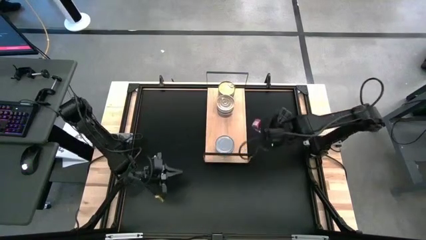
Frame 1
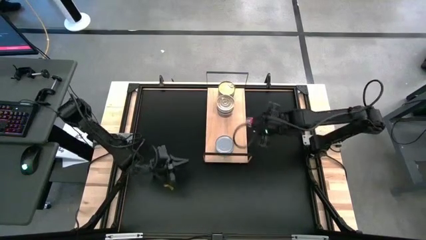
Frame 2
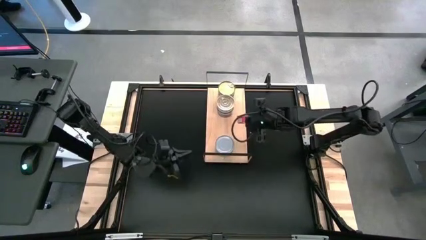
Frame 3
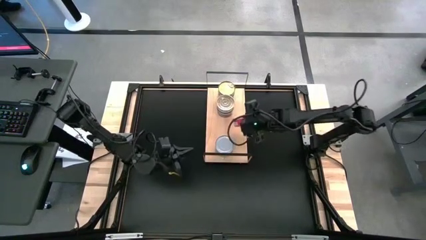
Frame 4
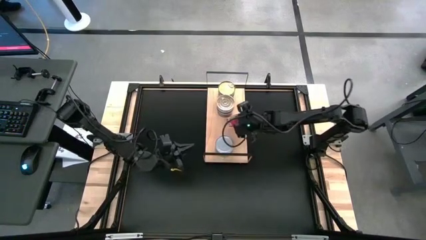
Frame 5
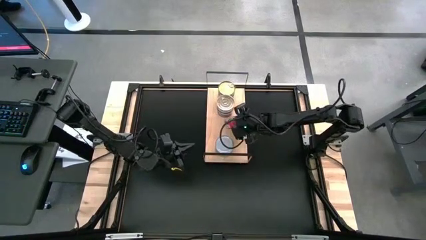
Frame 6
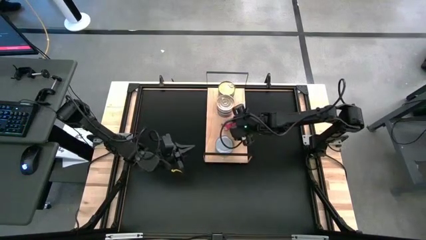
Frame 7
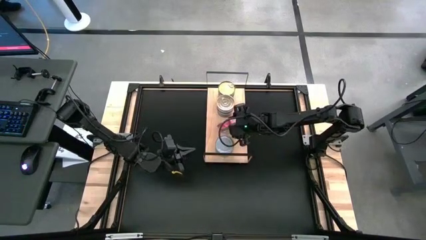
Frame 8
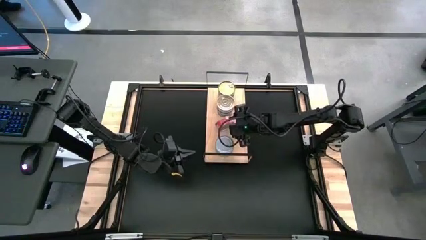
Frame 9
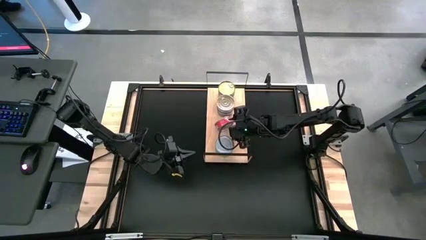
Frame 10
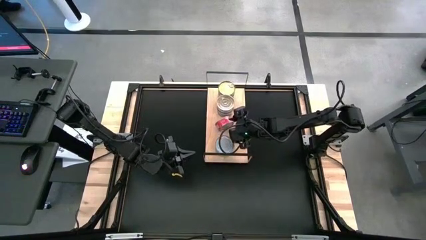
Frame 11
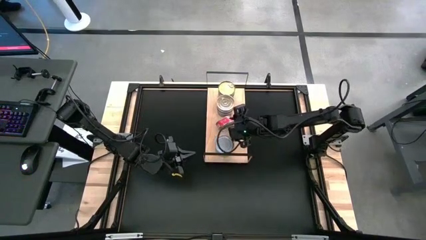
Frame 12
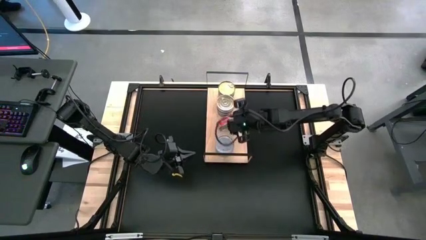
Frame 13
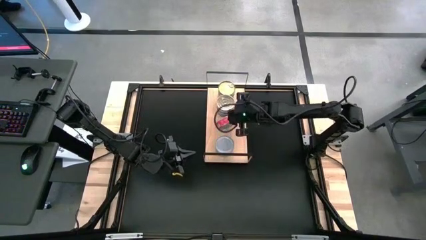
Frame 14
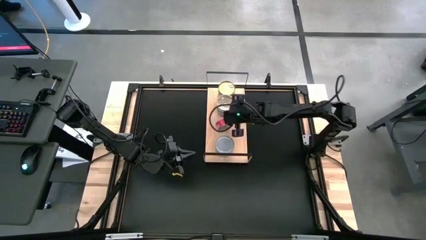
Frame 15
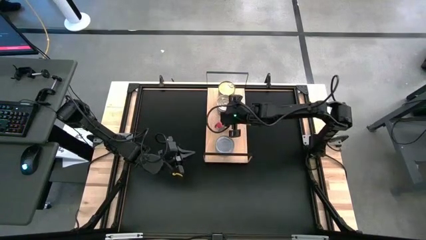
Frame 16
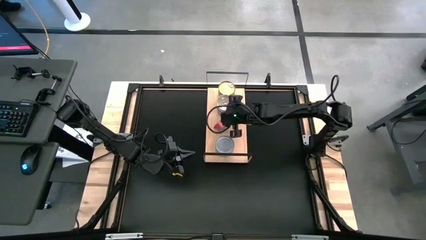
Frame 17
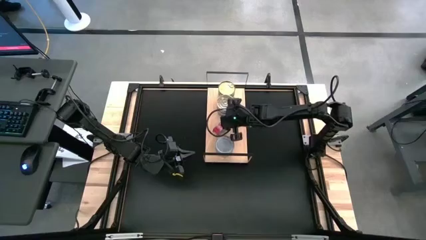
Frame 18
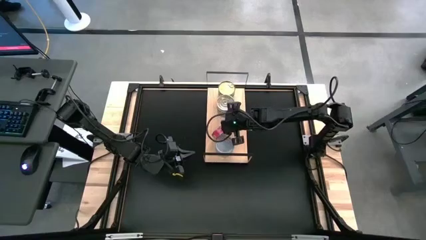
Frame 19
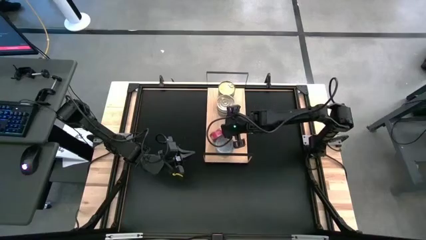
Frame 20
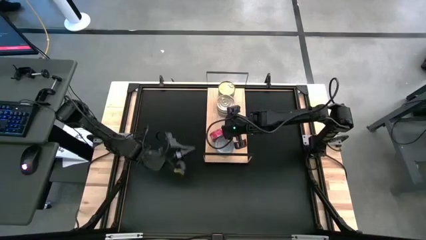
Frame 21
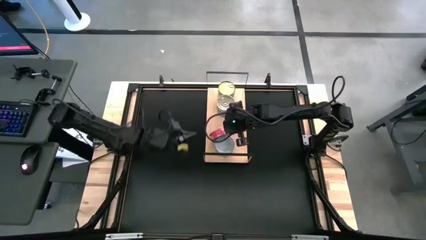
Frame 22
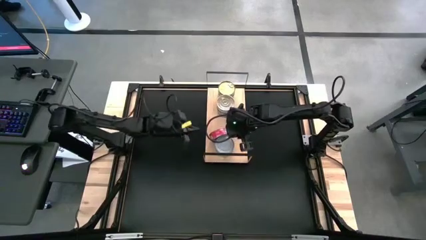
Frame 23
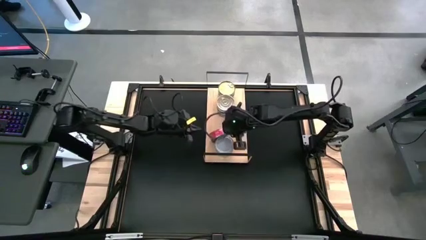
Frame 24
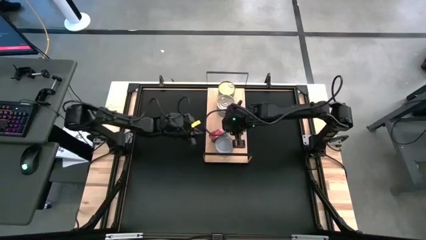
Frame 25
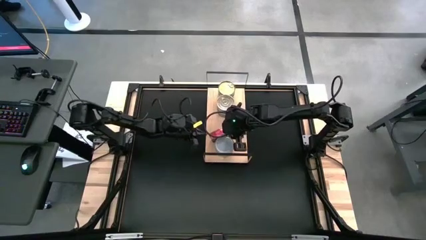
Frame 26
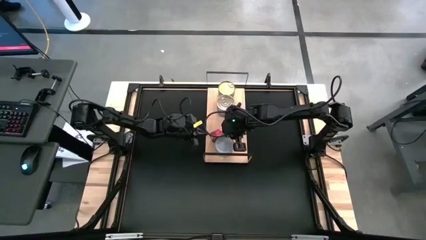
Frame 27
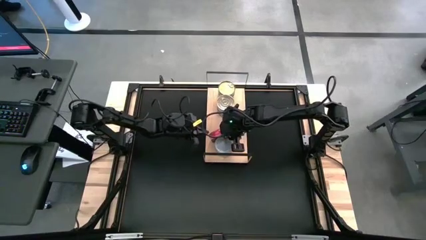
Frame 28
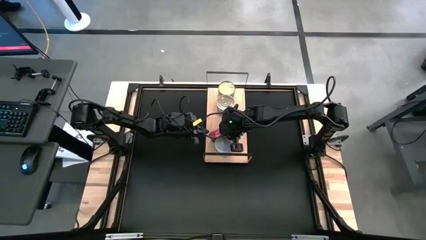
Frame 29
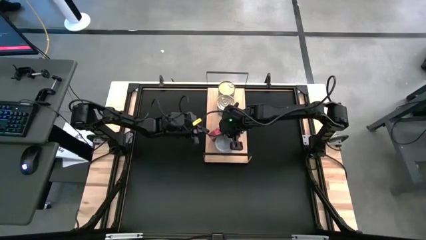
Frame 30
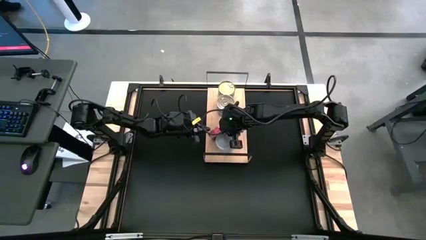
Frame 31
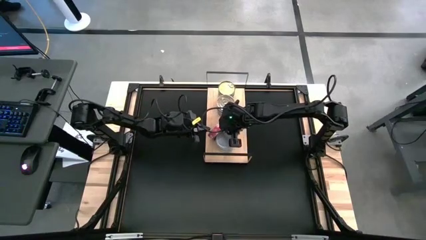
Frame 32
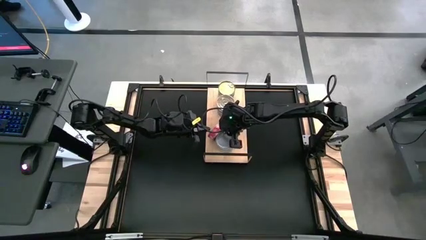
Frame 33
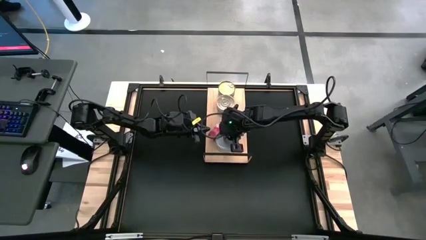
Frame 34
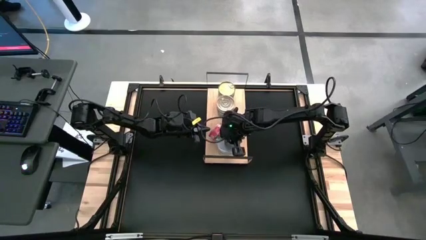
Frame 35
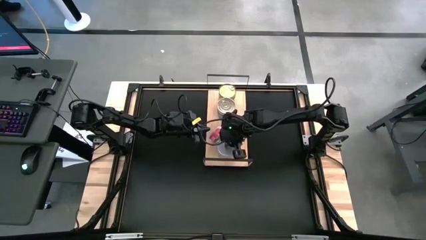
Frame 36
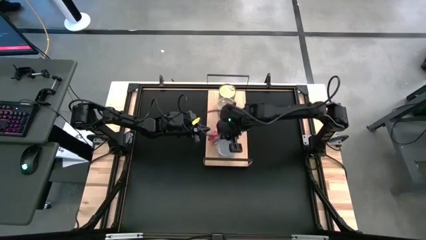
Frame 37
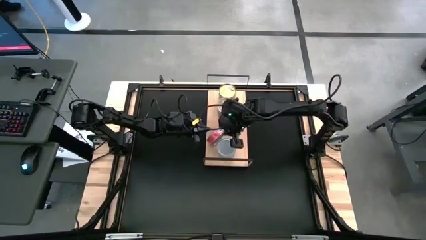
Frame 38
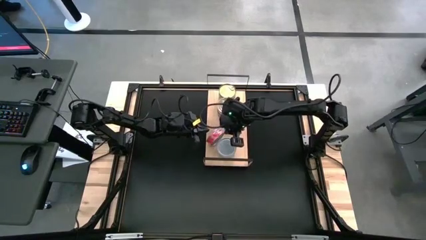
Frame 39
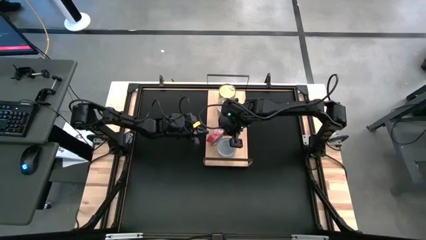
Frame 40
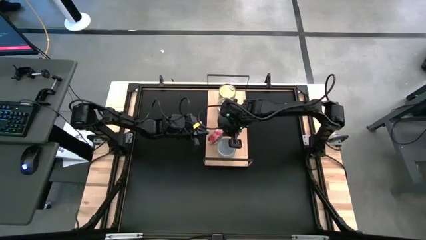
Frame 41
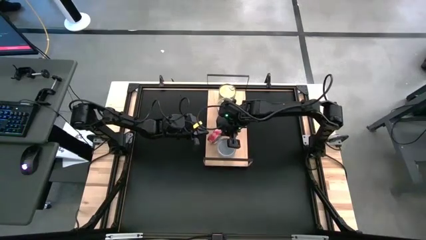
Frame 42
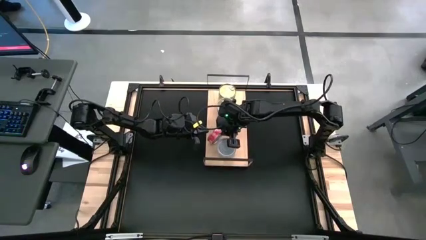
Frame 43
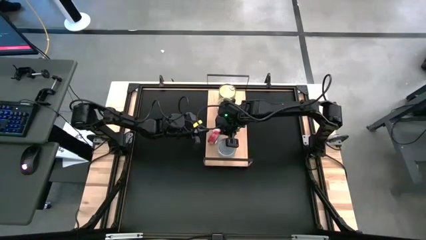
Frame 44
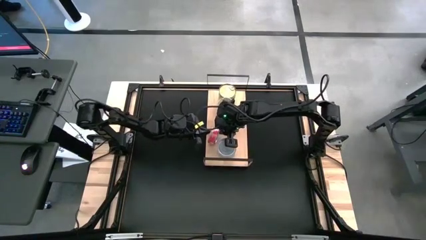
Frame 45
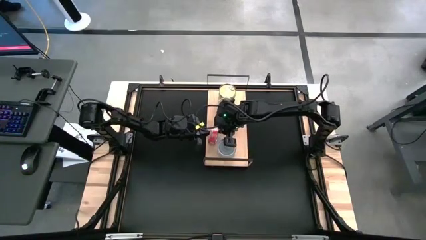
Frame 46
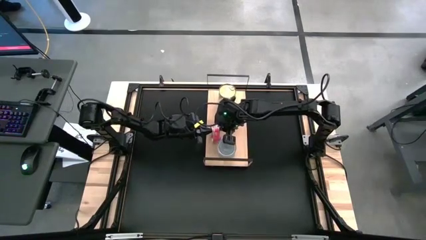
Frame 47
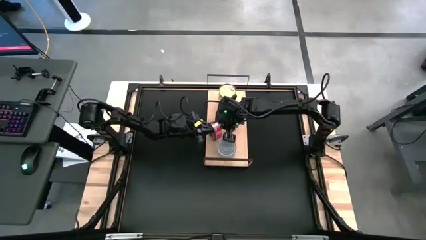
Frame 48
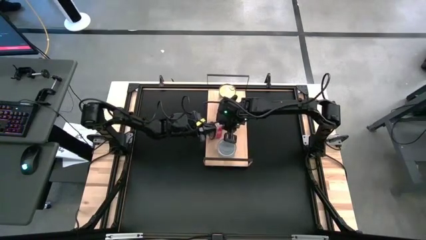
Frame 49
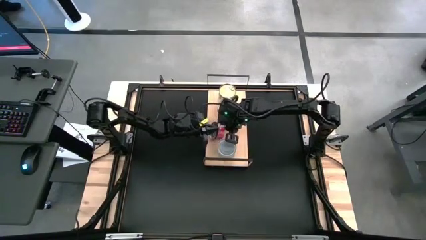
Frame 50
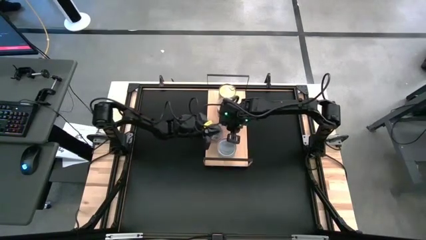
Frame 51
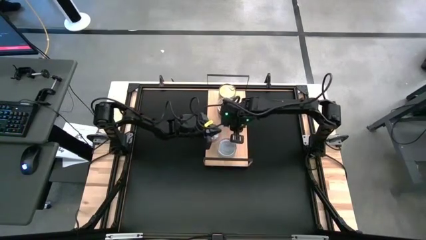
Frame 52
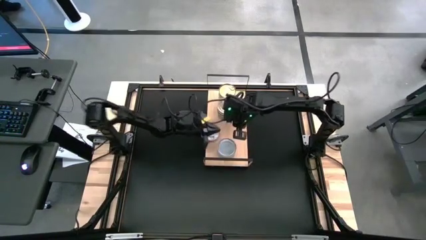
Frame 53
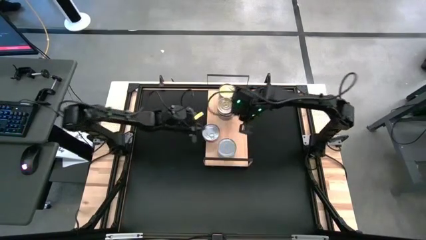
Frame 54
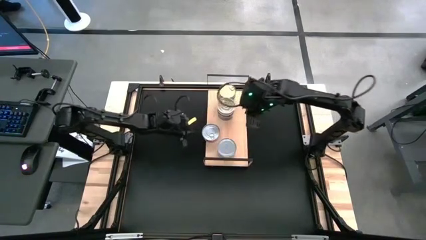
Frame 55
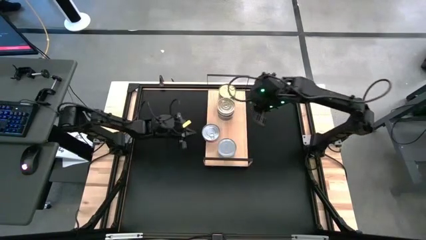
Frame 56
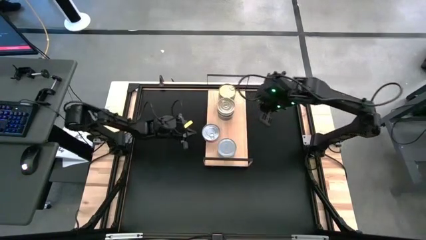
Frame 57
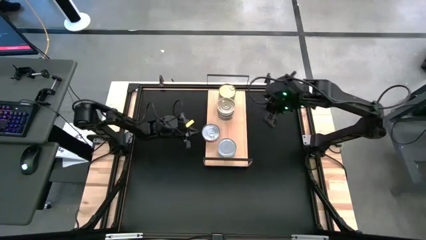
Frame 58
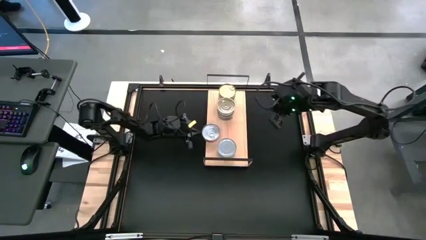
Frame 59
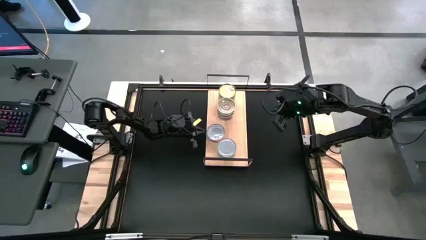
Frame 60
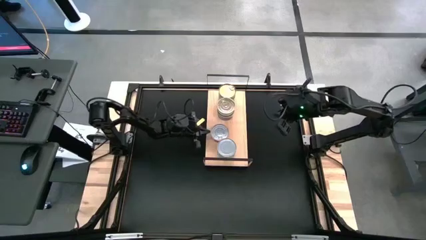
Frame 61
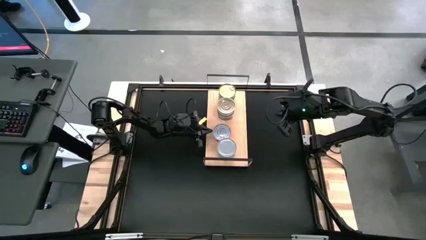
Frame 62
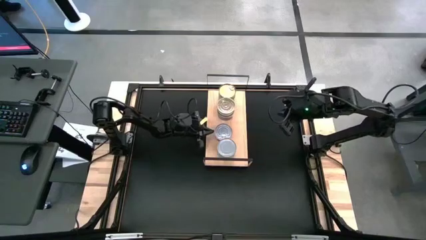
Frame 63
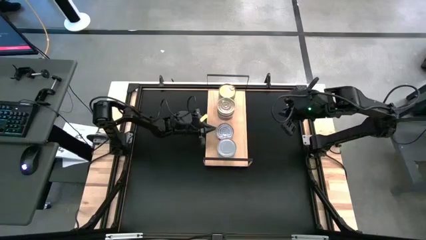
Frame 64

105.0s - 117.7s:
Task: Stack canned seafood by type on shelf
Put the red tuna can on the shelf
